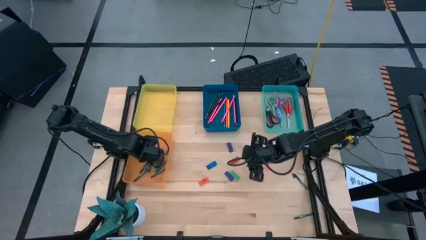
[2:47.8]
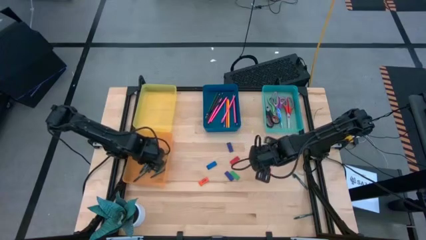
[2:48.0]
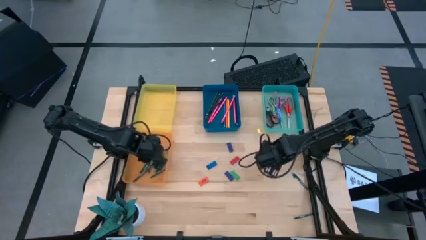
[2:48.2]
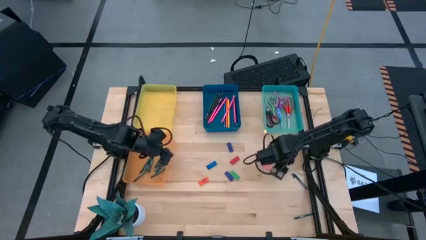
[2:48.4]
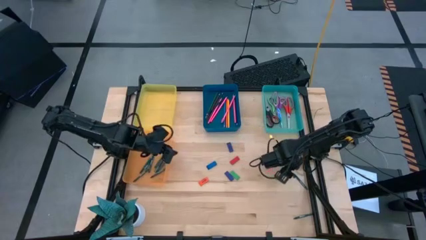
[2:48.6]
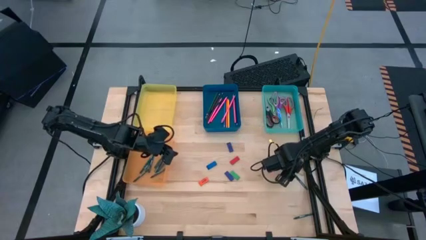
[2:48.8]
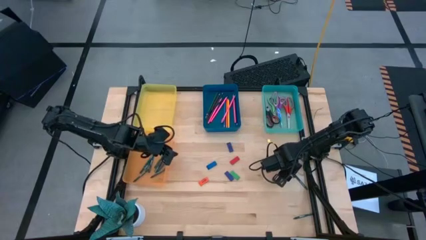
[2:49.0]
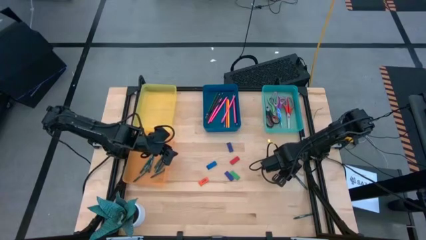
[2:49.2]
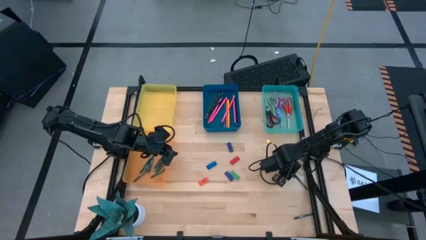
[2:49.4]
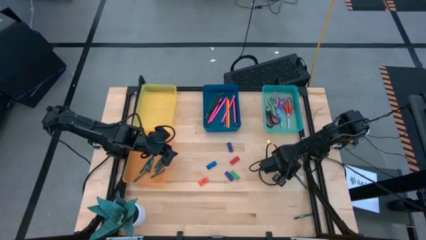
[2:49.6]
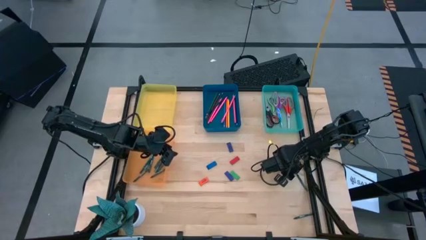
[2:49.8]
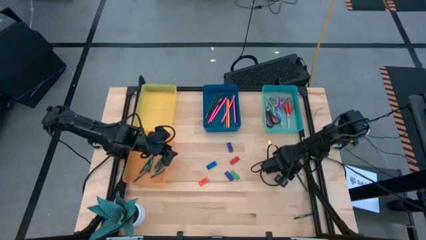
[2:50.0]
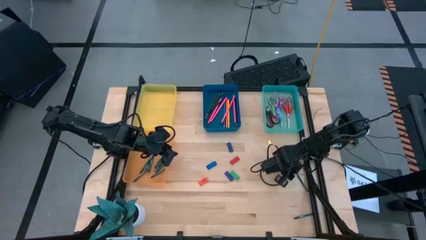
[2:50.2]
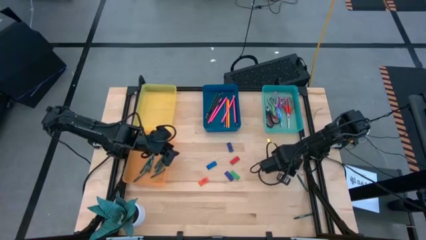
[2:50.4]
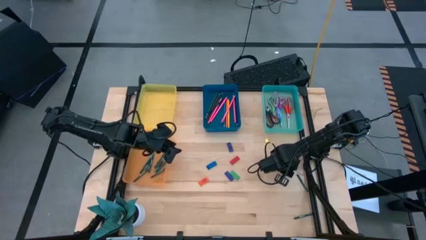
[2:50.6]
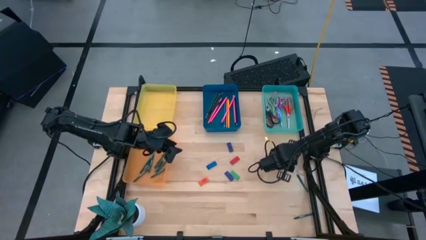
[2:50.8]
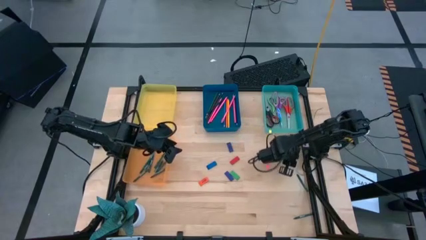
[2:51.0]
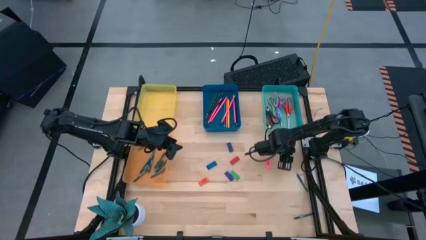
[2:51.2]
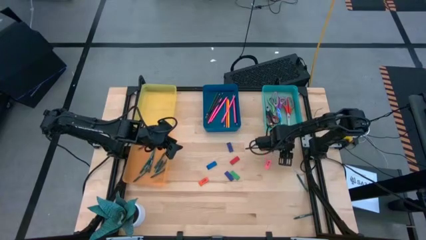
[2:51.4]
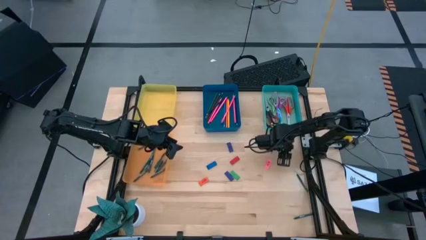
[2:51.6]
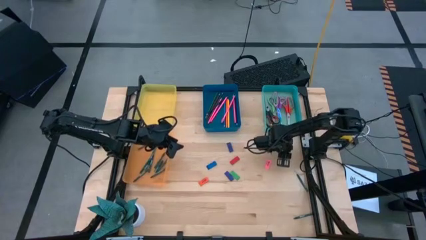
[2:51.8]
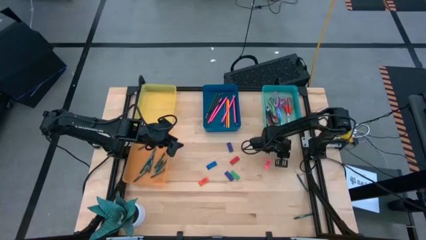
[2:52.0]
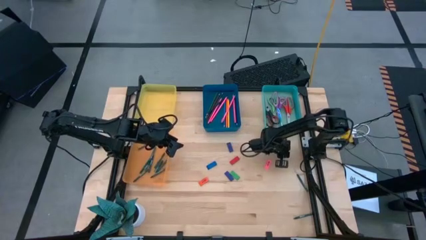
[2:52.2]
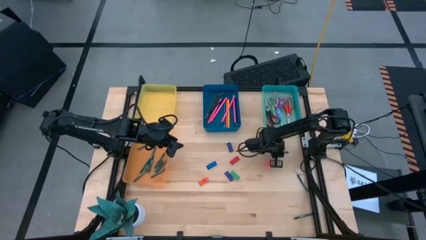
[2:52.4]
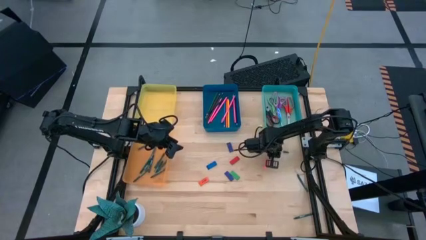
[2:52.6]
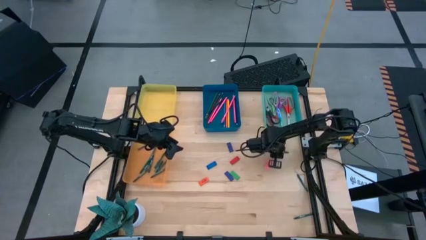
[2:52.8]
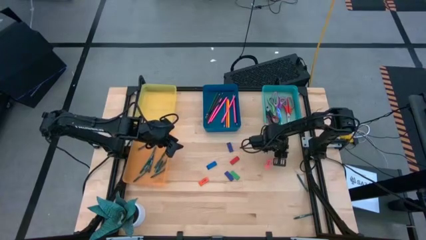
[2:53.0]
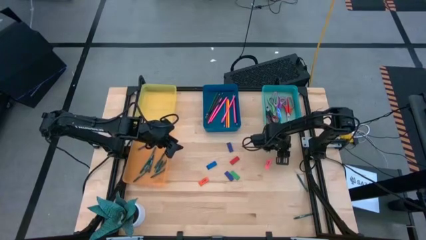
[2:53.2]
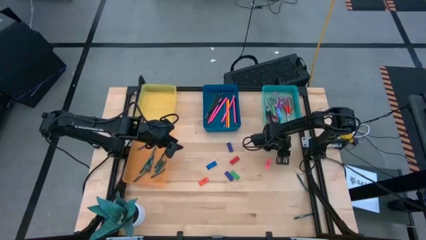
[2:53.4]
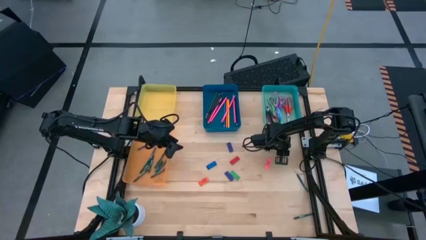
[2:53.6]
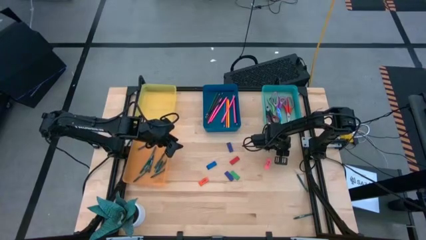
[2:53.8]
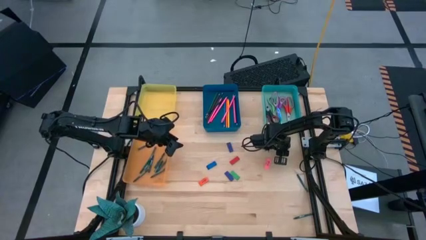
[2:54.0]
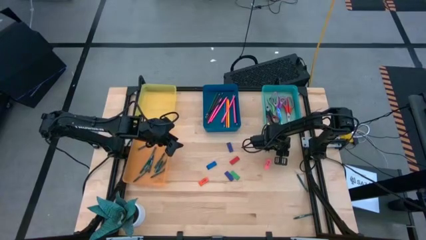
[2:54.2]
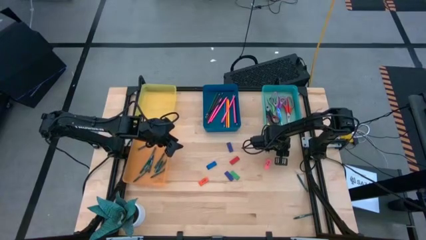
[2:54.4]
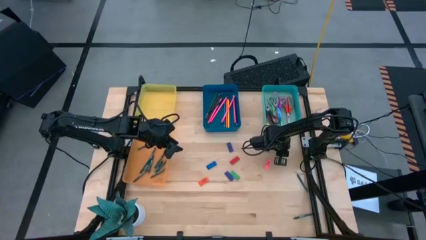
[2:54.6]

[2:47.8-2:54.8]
Task: Sort crayons/erasers/pens/pencils in bins
Put the top green crayon into the orange bin

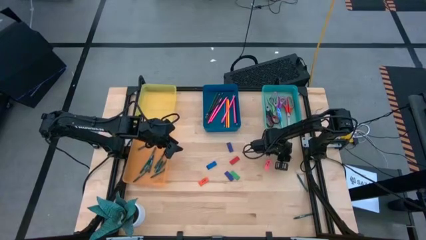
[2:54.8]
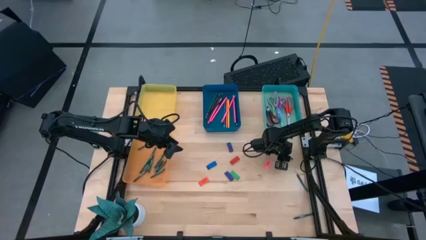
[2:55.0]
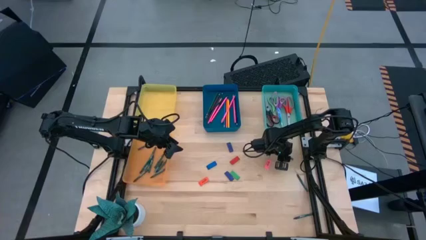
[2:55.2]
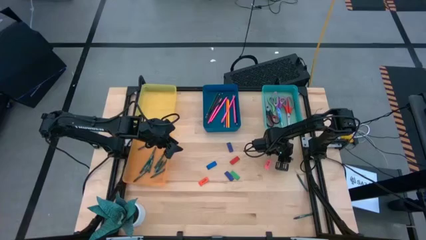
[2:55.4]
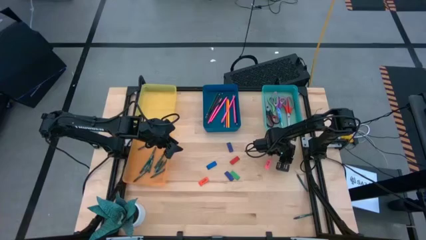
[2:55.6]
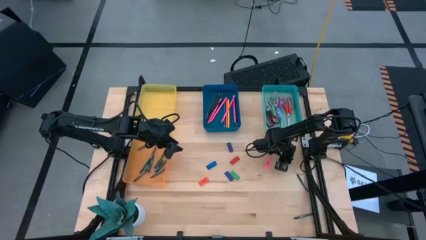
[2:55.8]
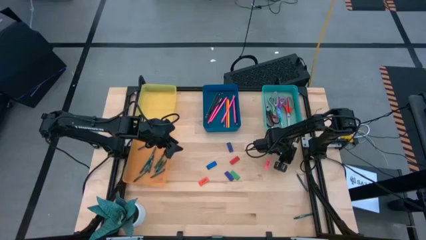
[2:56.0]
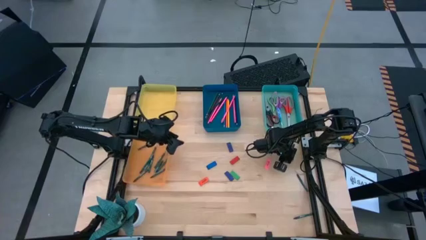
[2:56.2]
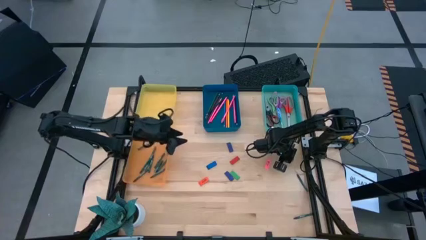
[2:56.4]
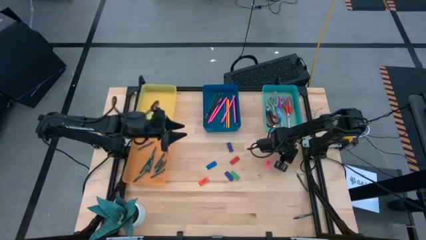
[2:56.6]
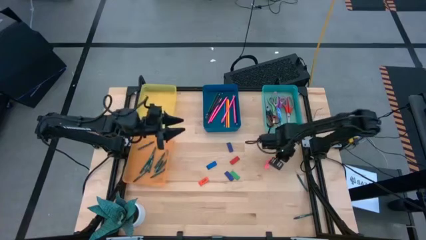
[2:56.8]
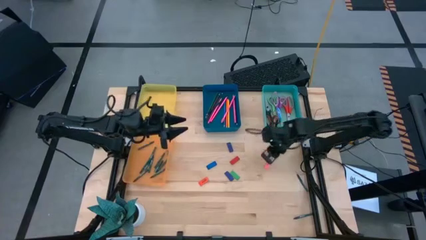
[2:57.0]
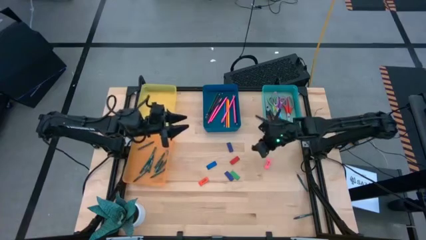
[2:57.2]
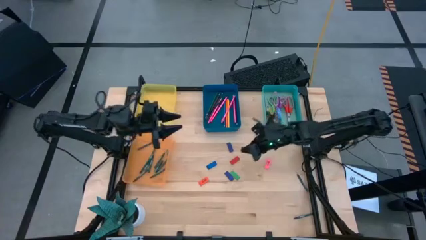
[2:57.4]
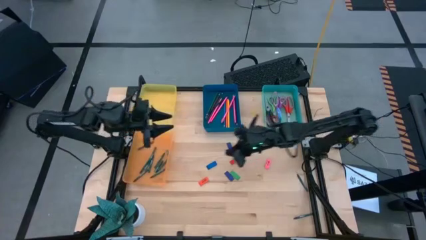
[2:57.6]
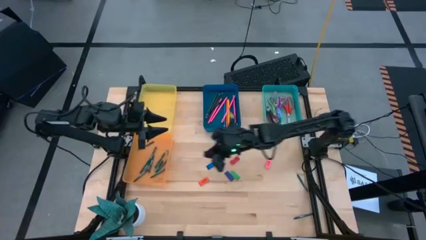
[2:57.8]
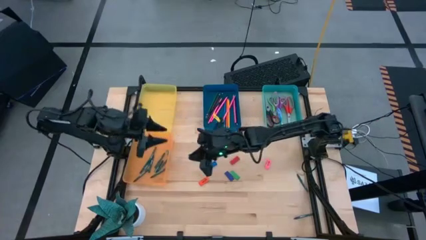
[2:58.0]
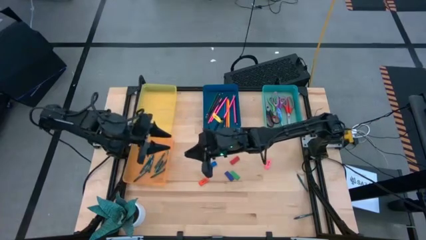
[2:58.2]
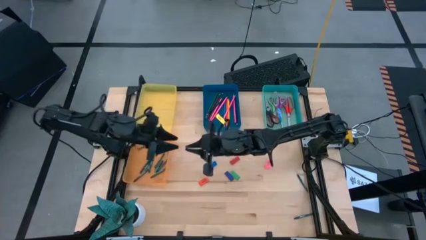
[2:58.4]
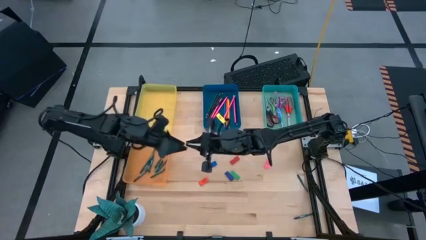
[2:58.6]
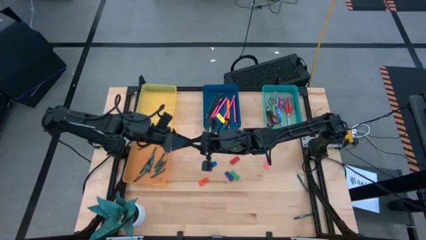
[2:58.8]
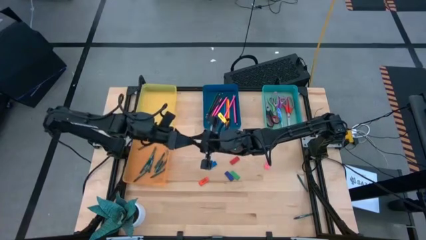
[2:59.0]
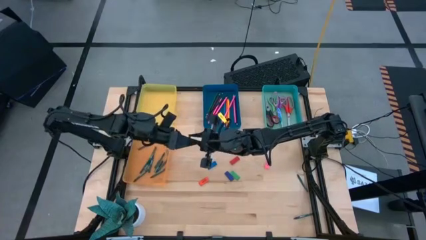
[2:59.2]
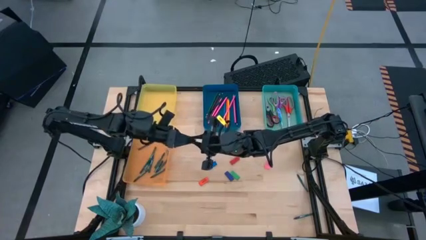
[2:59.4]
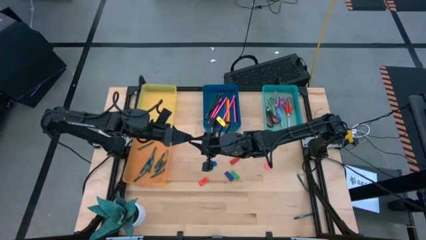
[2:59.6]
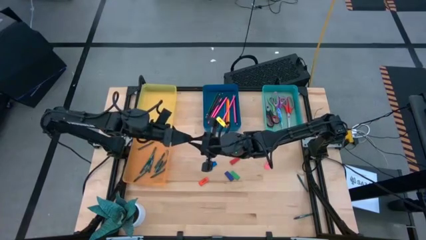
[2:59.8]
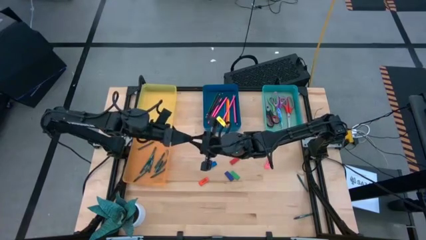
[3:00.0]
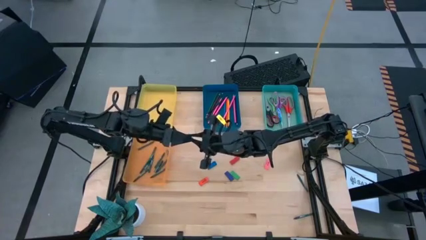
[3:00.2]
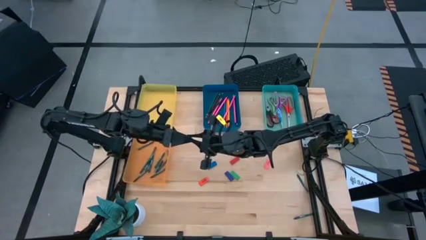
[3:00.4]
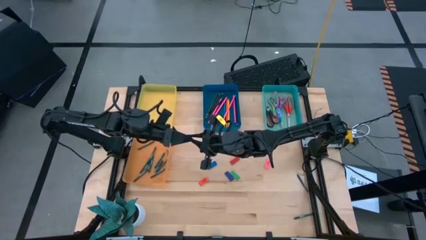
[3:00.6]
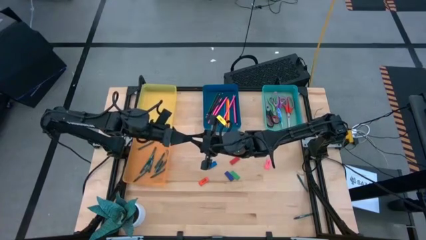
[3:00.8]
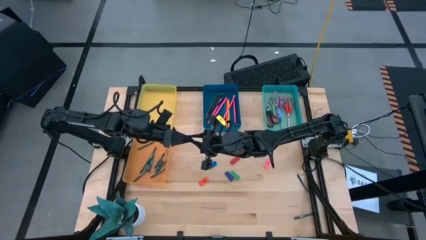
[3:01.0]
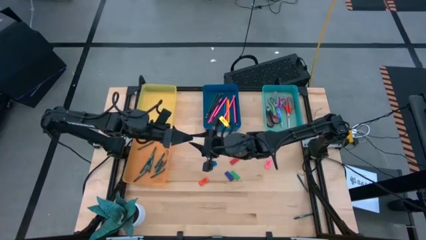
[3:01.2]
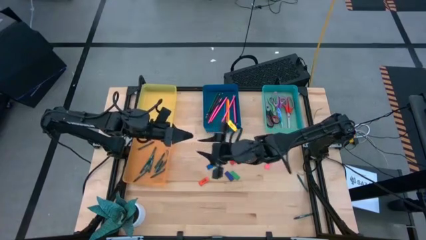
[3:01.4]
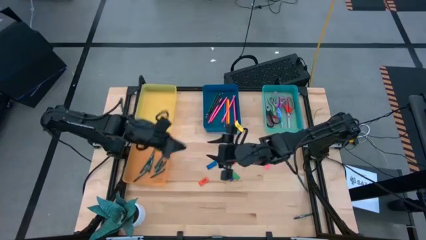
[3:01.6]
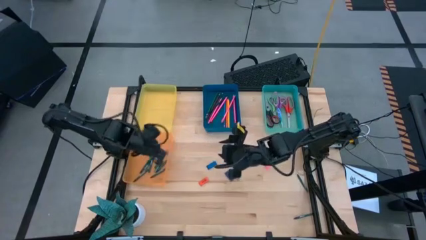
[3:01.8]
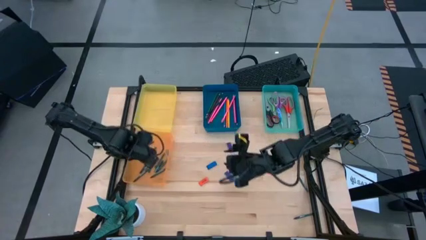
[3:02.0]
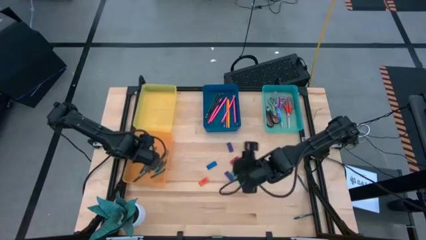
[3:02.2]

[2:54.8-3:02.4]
Put the top green crayon into the orange bin

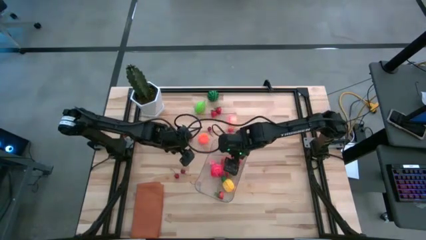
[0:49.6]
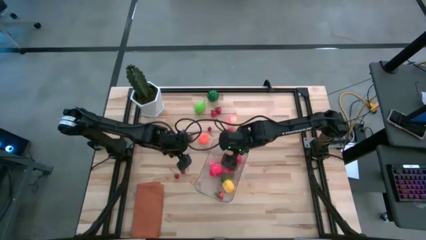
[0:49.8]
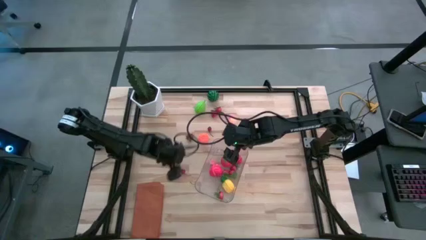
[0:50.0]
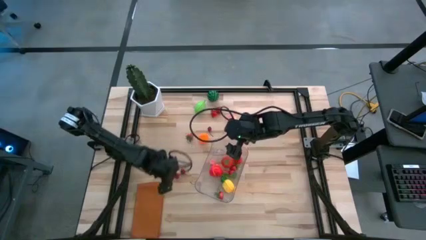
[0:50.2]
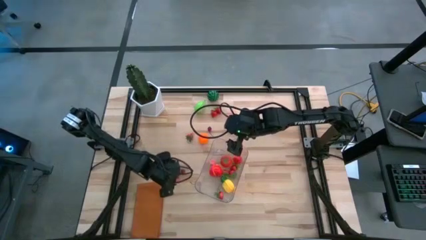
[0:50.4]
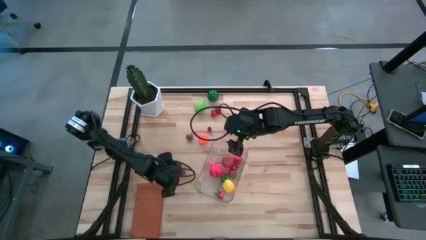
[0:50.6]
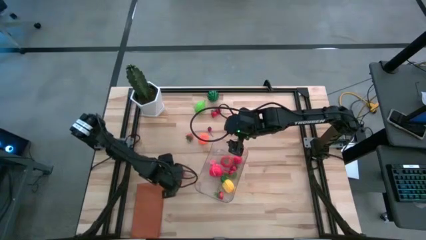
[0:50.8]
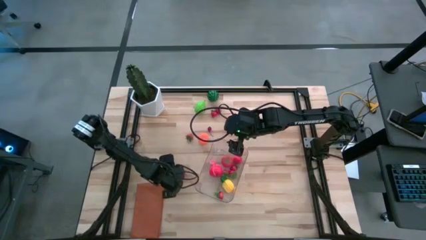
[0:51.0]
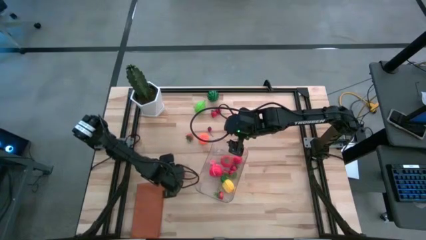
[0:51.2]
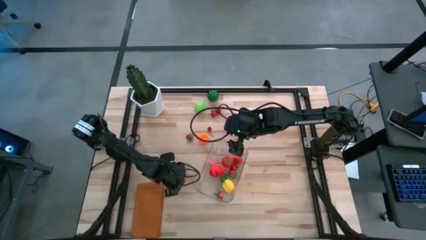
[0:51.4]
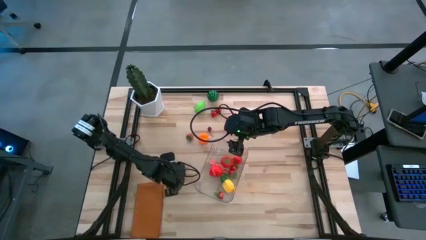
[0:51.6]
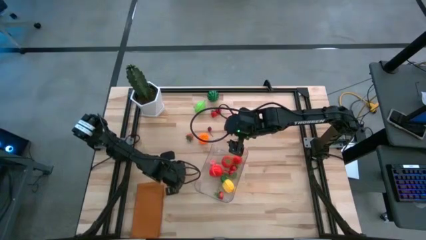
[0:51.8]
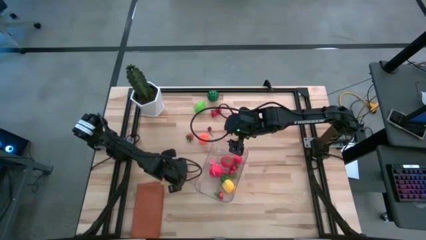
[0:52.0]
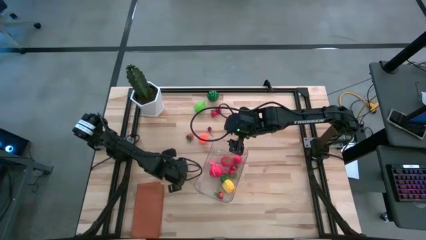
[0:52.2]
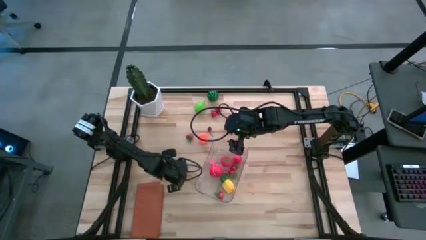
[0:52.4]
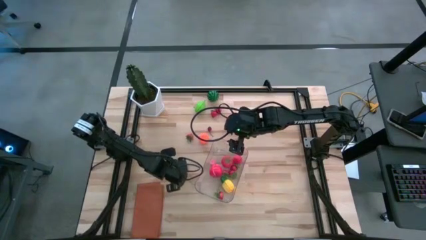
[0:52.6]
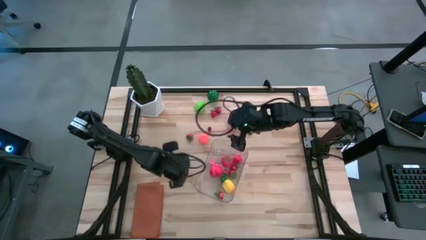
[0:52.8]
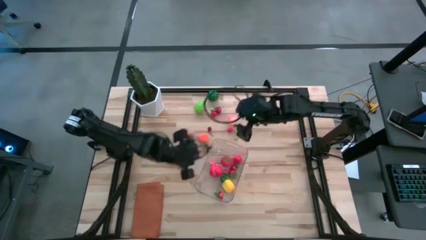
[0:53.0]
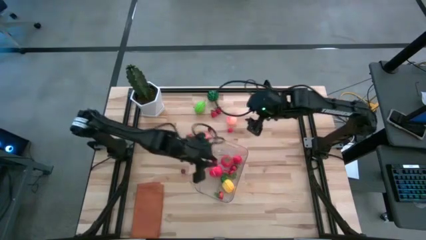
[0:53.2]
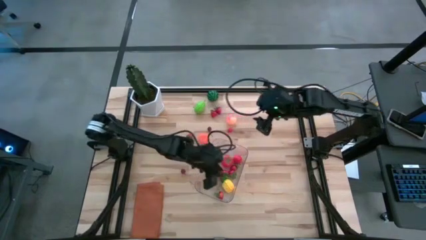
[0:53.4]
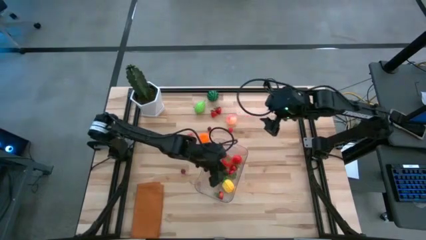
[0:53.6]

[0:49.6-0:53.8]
Task: Pick and placing Produce into tupperware
Put the red cherry into the transparent bin
